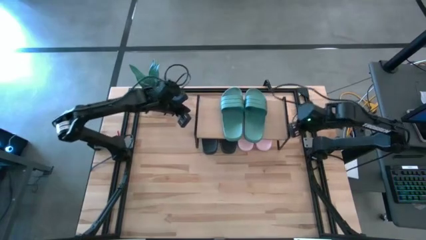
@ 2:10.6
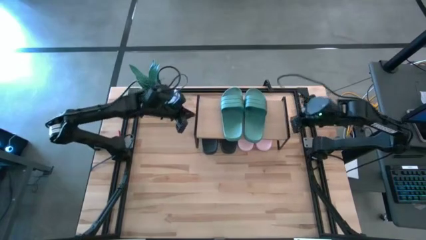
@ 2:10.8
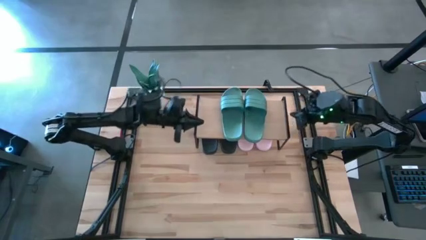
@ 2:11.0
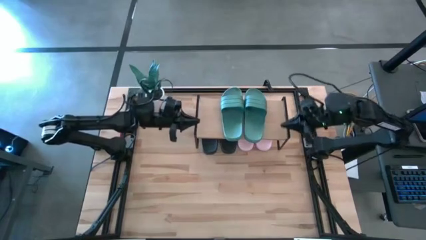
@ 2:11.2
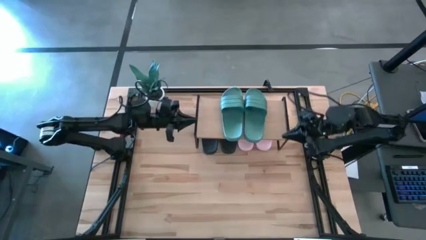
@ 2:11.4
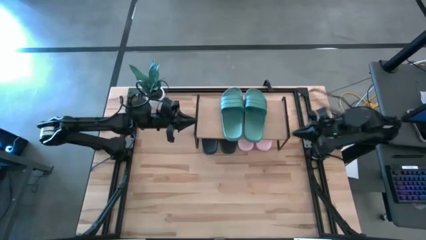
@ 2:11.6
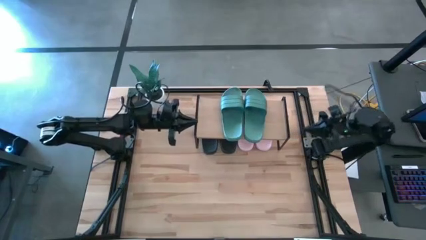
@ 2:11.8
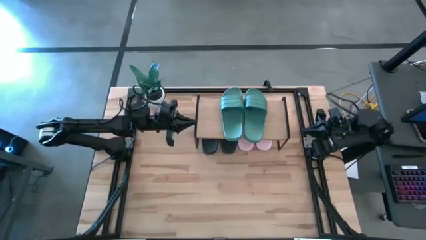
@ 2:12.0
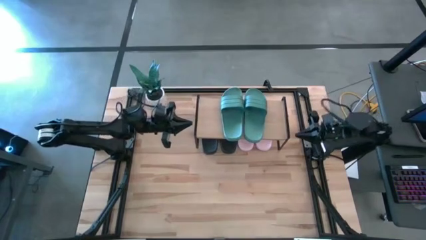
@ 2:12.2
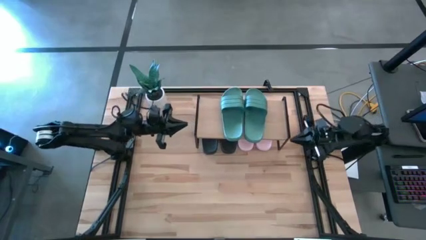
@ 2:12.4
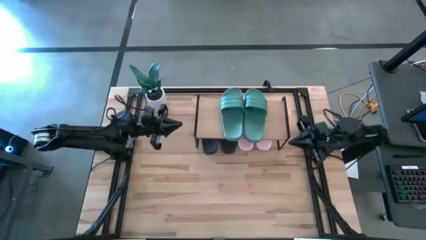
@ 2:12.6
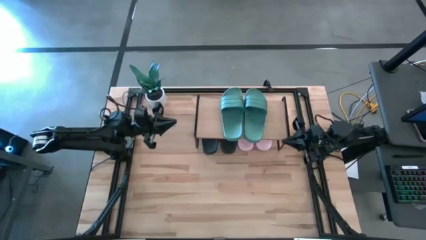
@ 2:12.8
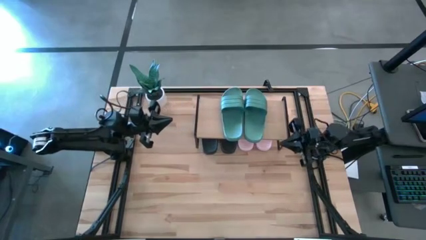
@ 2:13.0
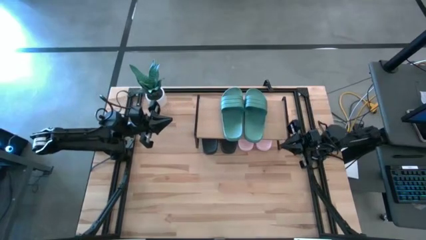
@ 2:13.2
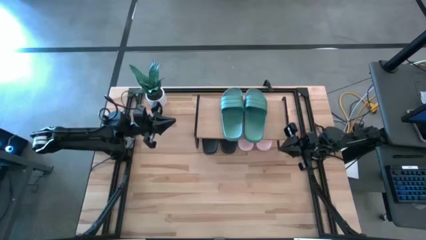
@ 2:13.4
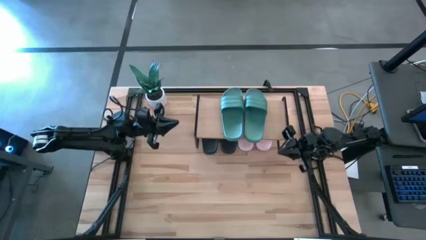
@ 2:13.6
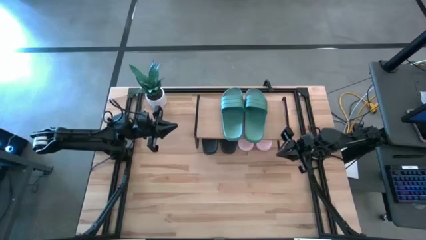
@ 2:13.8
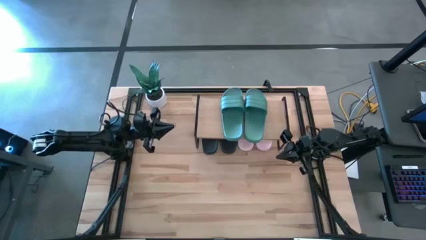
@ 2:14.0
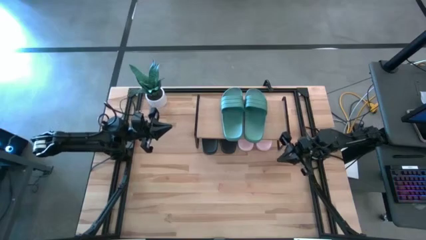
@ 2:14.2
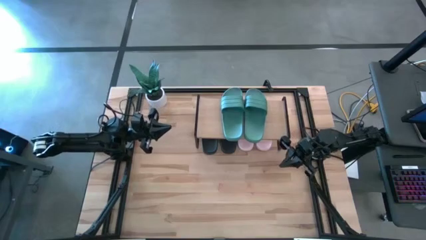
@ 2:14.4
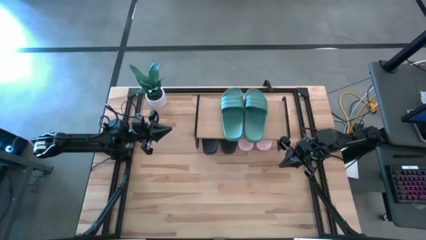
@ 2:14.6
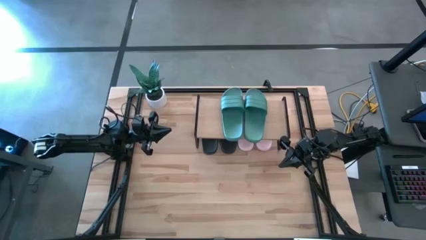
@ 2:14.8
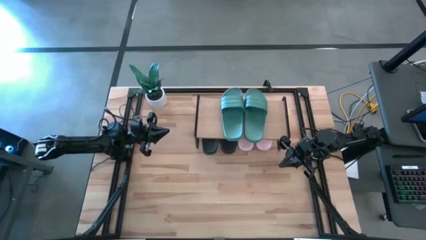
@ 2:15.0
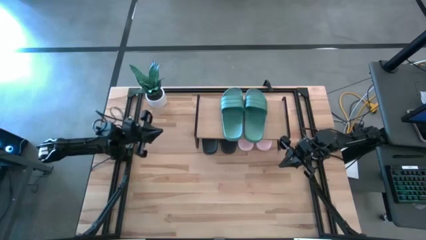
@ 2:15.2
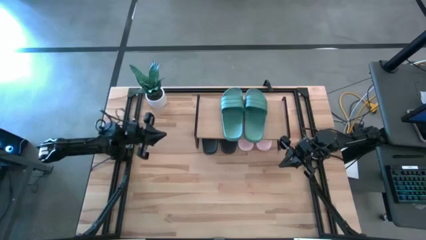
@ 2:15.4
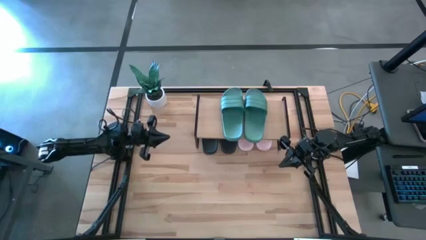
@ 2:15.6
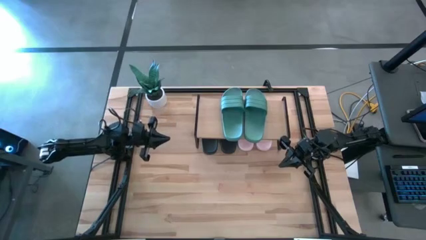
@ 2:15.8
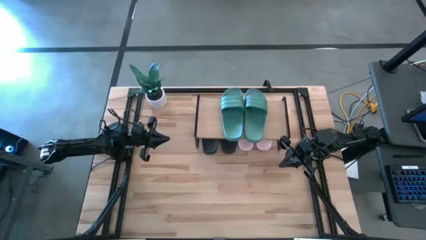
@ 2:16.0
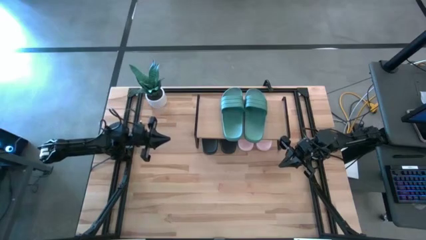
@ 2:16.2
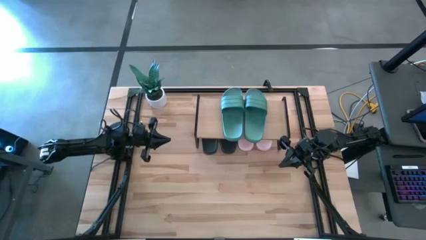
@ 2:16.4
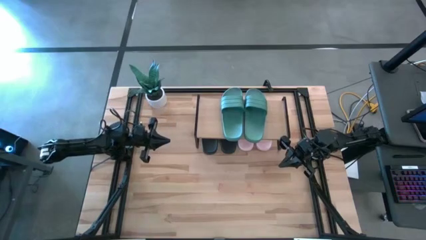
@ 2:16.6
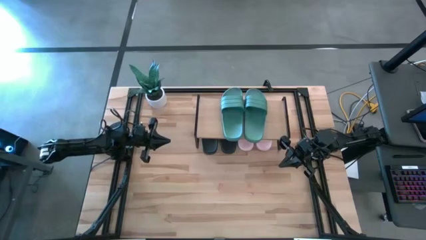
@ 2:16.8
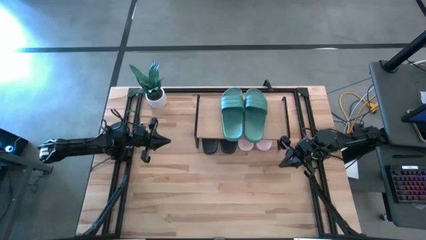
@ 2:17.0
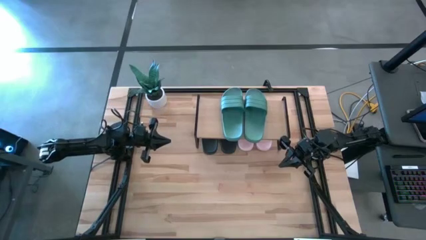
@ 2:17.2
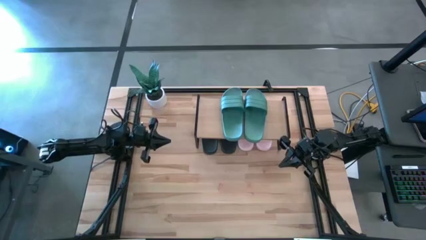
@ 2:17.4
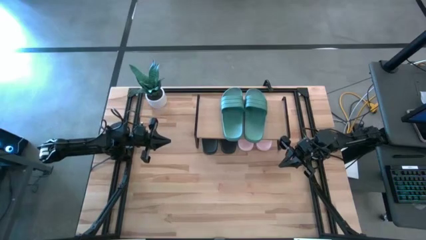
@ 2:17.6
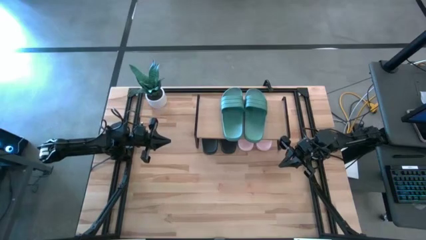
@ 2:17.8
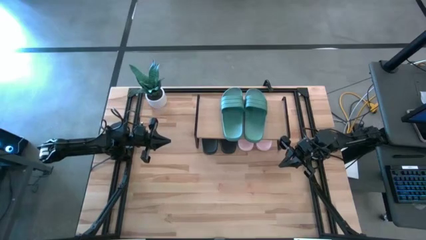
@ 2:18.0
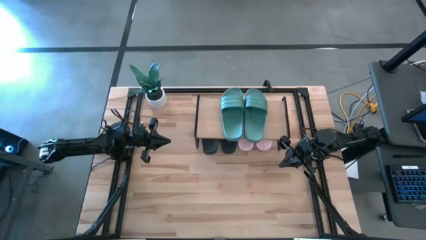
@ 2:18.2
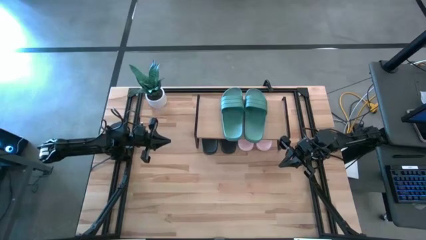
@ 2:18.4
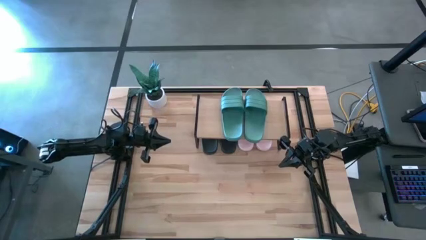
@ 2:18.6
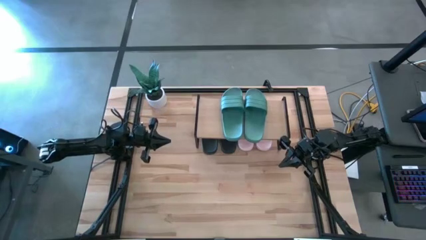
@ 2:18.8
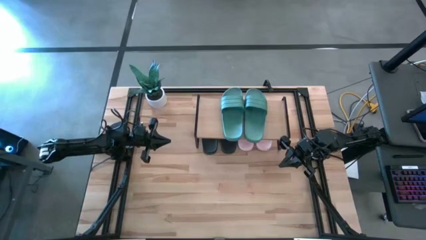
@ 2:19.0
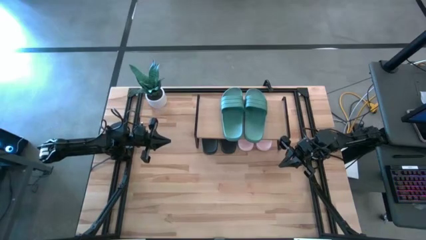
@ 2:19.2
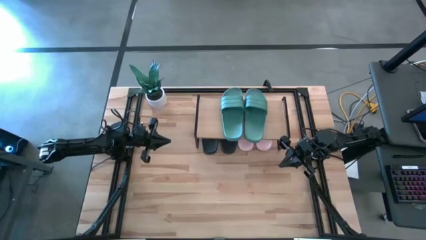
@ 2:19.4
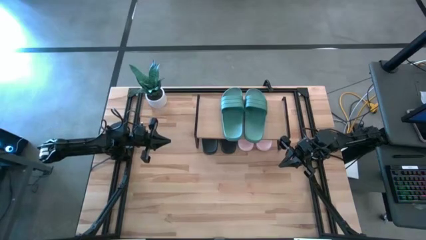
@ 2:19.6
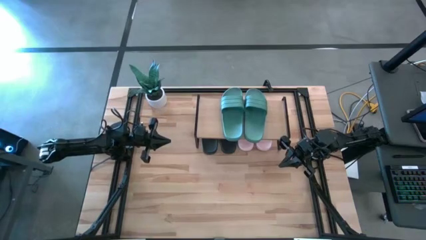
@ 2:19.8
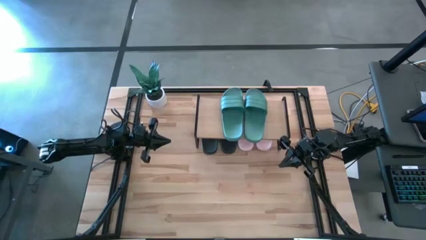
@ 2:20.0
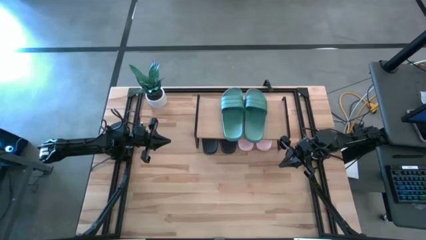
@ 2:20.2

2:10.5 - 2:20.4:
Task: Pick and place slides into the shelf
Return to Home Position
